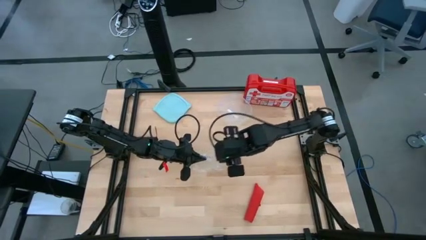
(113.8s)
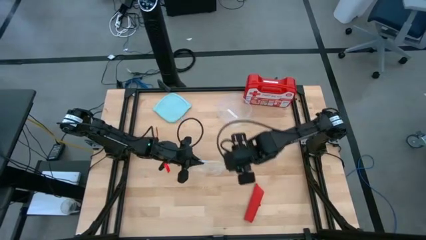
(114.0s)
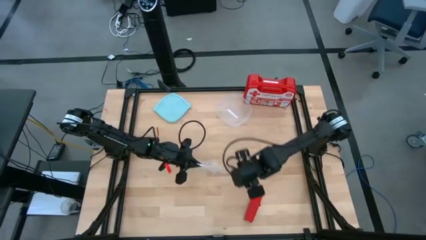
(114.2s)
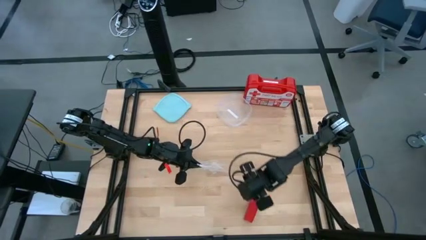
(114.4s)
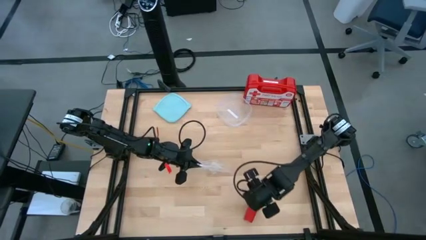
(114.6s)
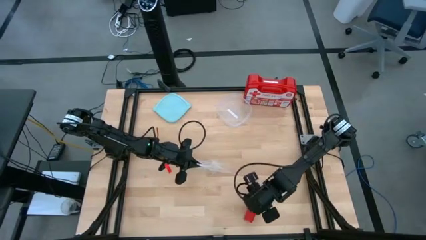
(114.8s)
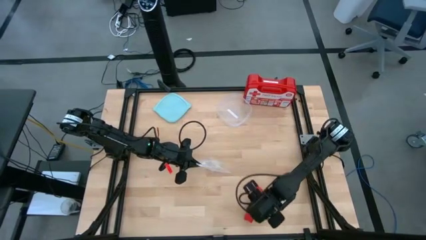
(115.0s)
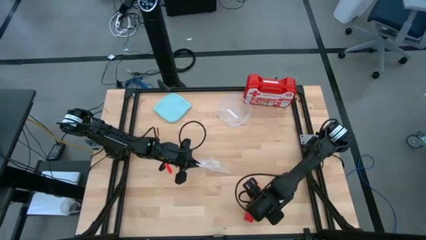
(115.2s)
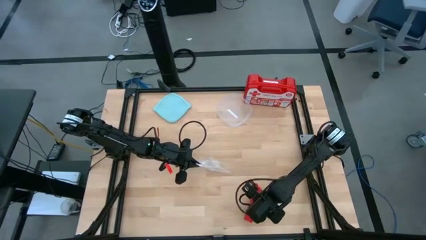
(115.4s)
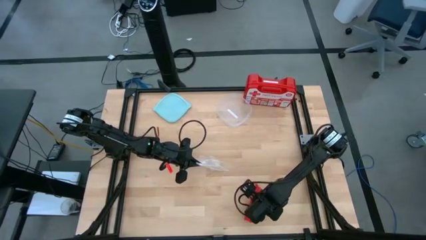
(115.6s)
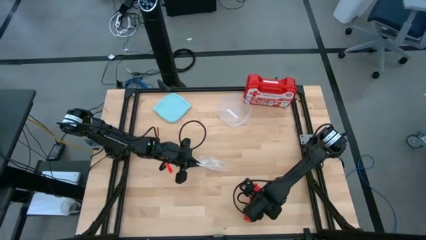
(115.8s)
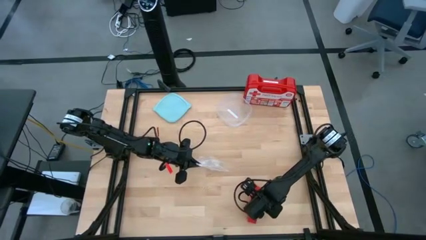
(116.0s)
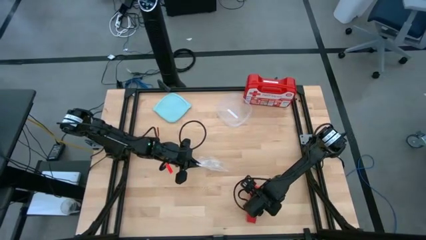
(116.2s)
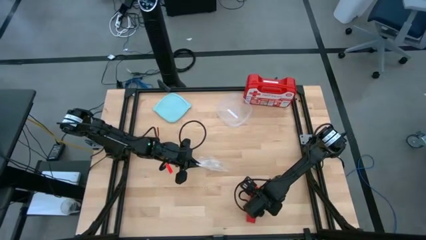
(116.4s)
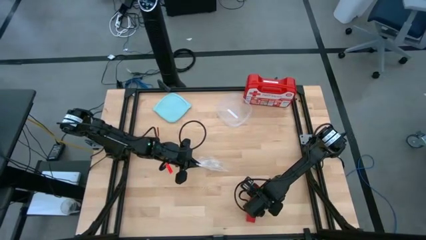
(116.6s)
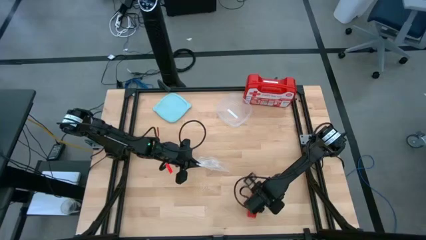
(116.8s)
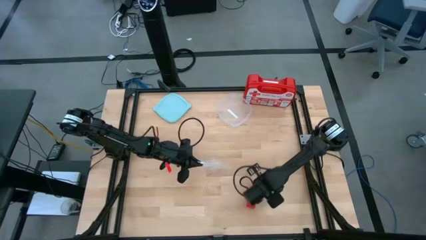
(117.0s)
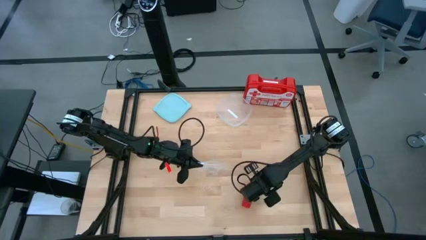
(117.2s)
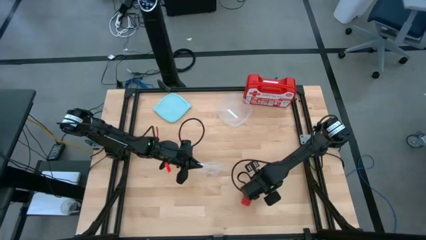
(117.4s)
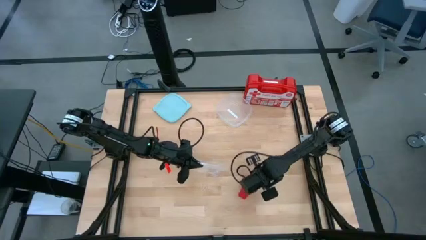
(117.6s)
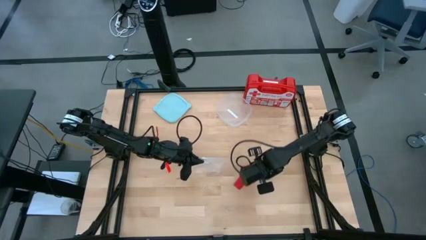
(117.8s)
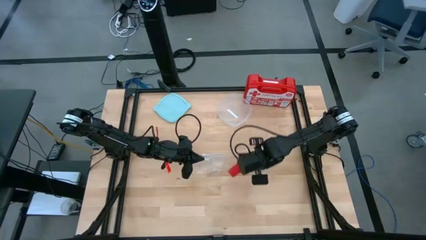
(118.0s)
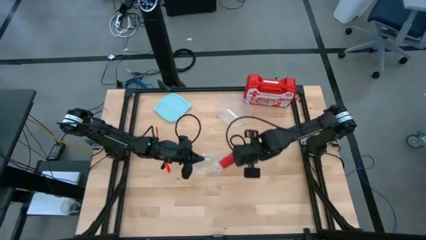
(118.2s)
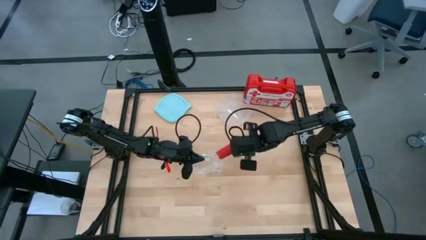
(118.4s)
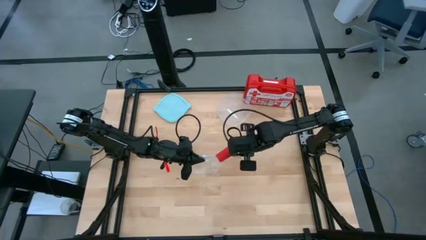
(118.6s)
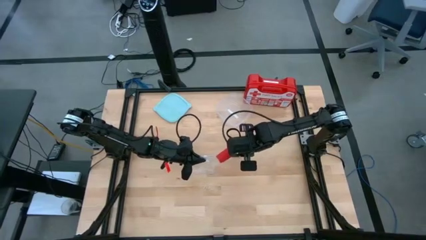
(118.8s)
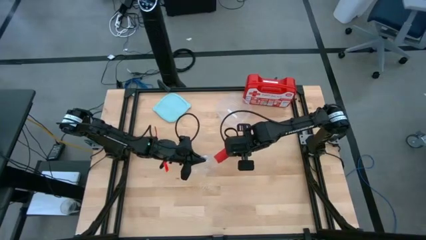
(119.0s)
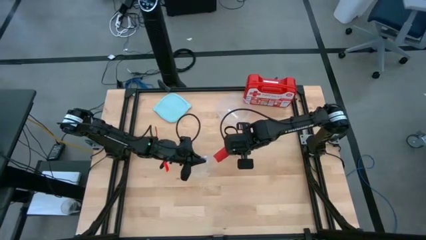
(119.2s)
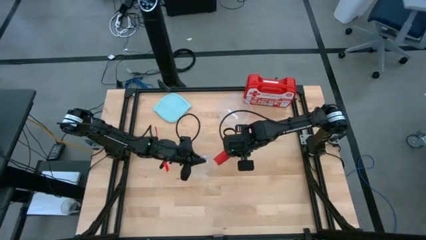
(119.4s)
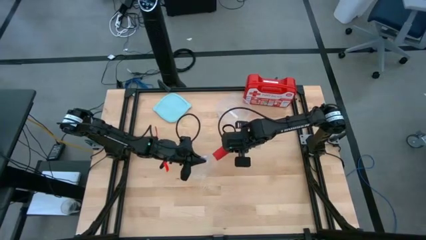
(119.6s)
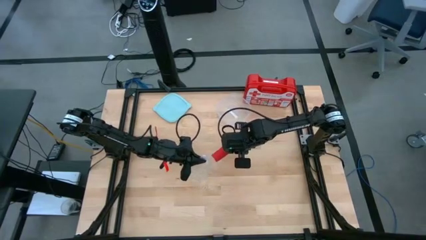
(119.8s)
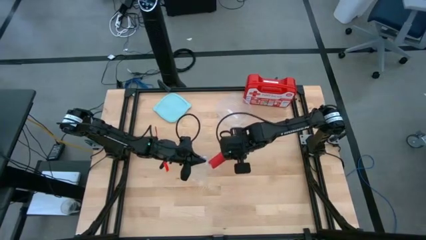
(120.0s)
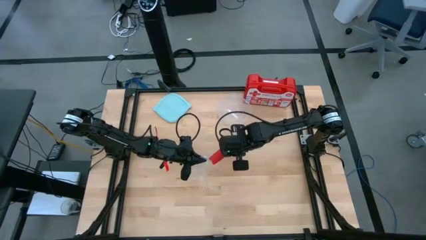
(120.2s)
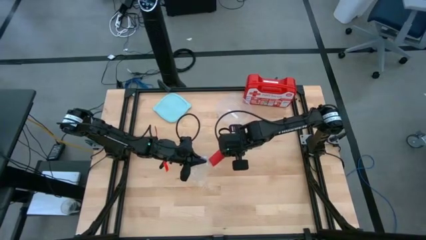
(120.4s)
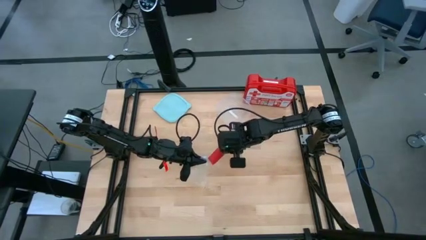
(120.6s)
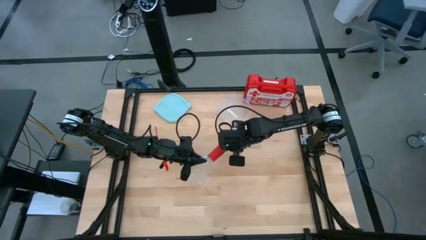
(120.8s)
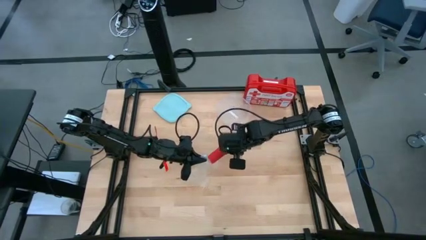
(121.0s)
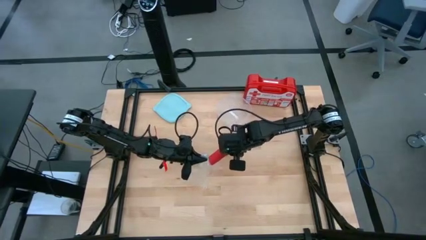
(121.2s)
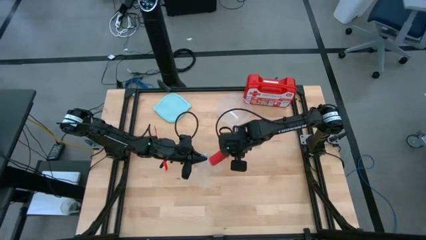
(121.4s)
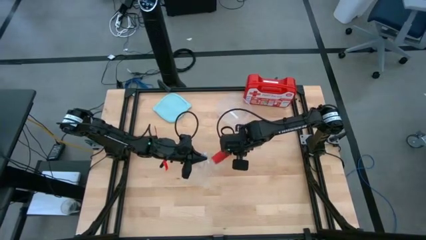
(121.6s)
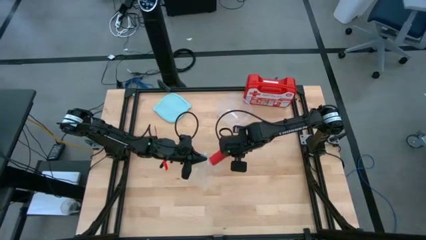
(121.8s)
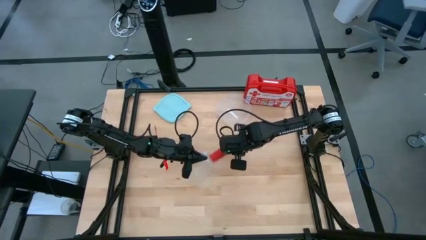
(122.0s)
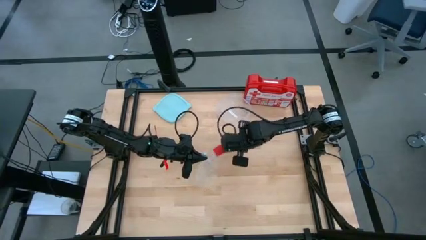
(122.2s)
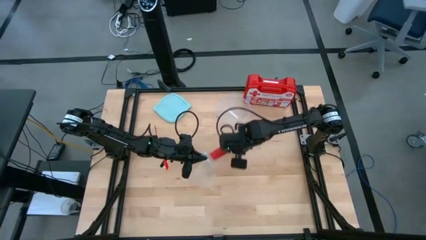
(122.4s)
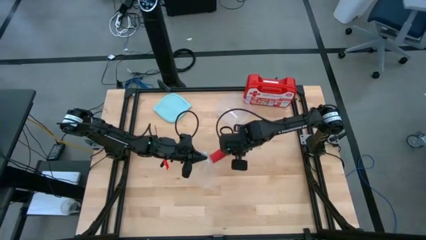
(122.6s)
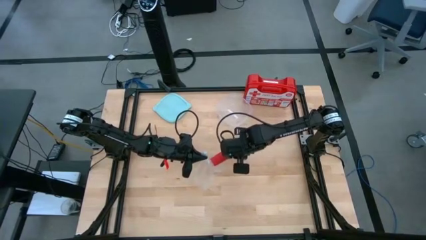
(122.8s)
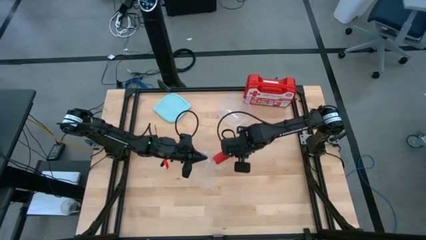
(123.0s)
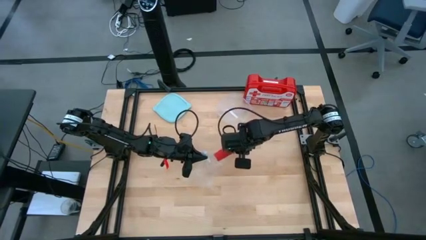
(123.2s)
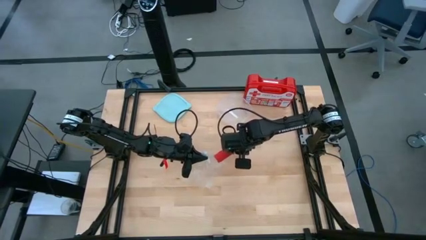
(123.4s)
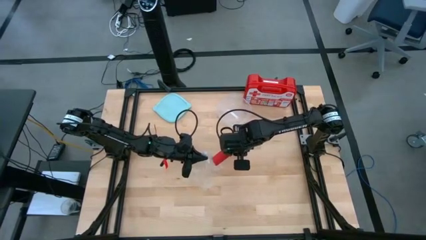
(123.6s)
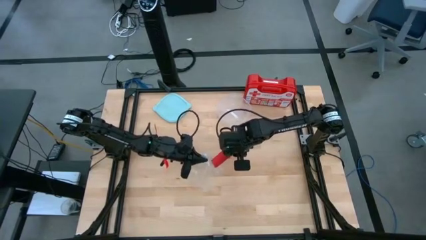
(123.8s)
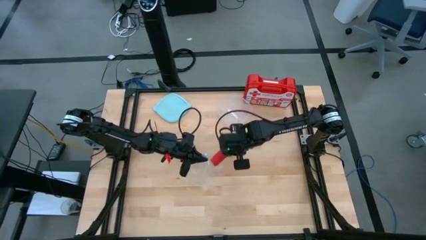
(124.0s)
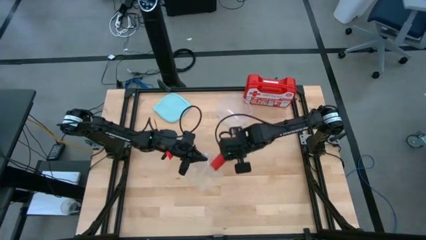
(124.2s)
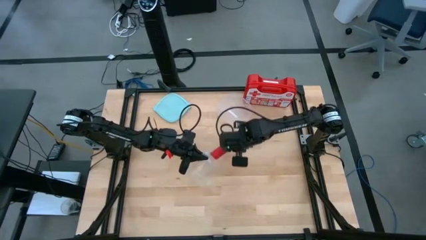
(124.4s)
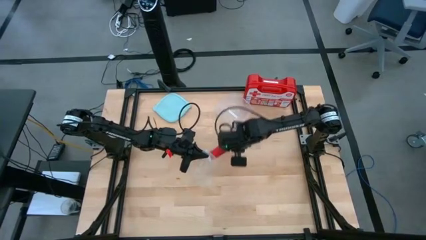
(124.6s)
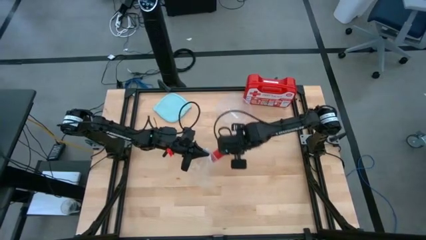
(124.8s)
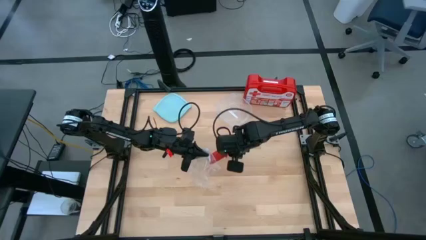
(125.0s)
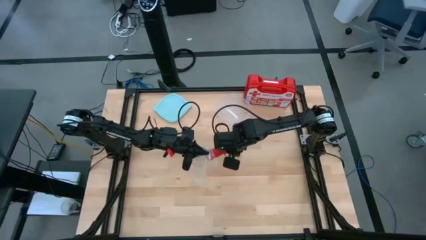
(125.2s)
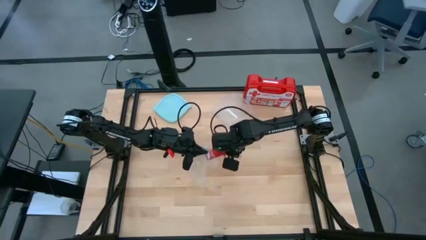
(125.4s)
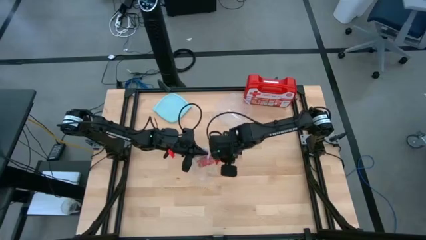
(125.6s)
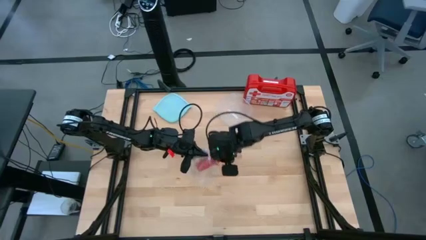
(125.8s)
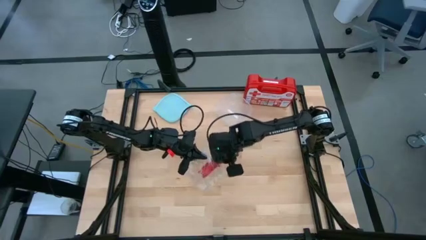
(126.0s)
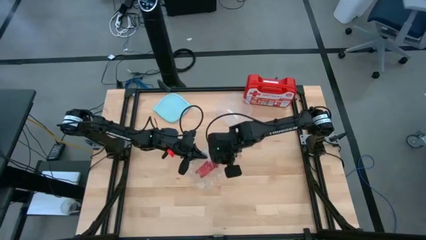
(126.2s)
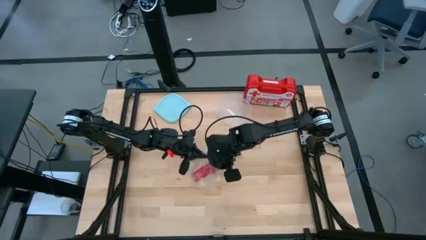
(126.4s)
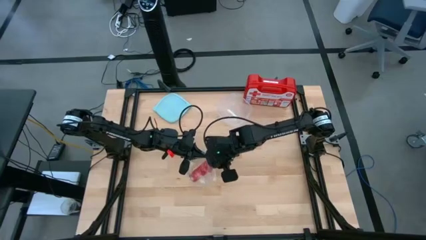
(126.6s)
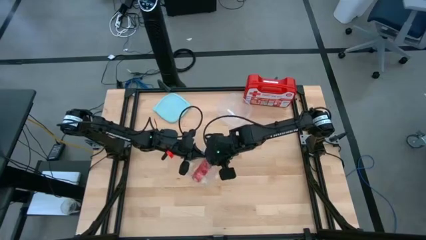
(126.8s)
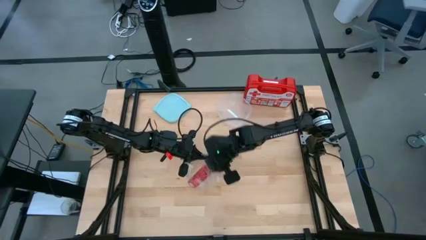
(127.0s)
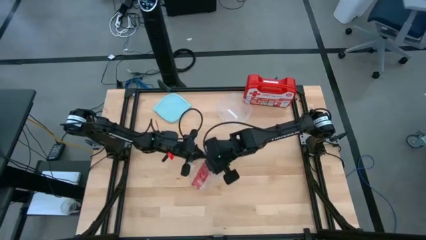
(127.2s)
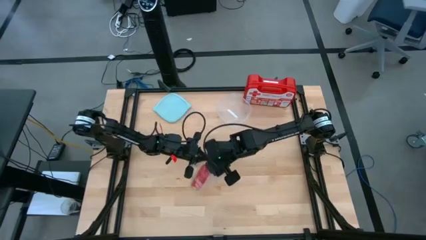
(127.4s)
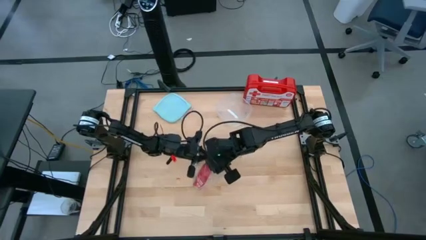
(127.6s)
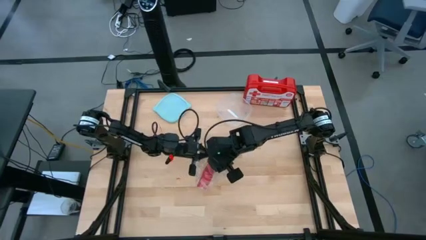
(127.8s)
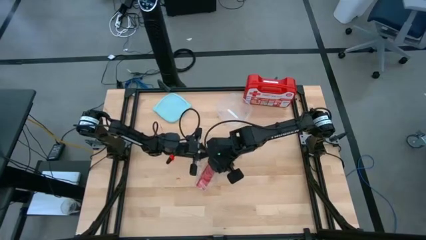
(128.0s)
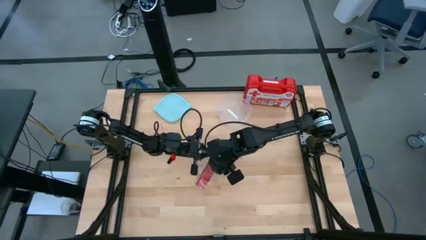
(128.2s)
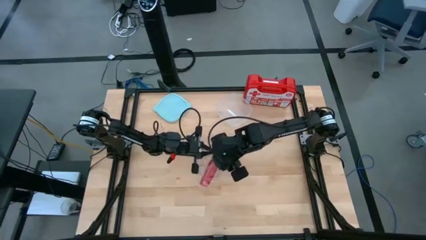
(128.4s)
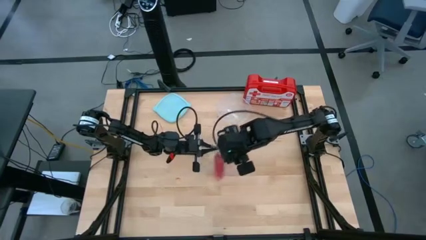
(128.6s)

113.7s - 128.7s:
Task: Roll bandage
Put the rolled red bandage into the transparent zip bag
